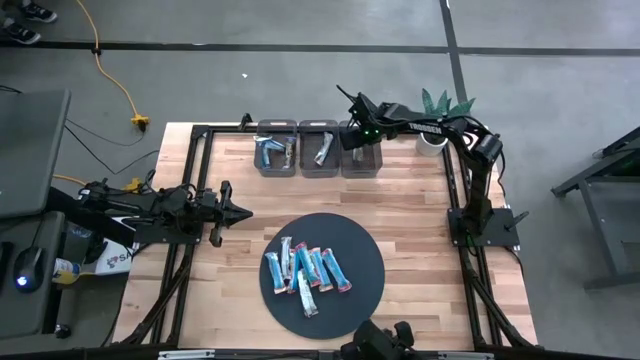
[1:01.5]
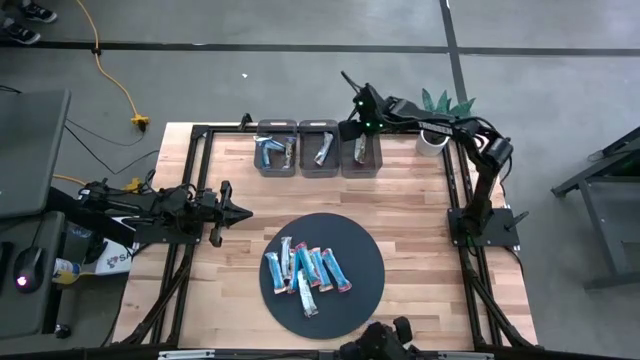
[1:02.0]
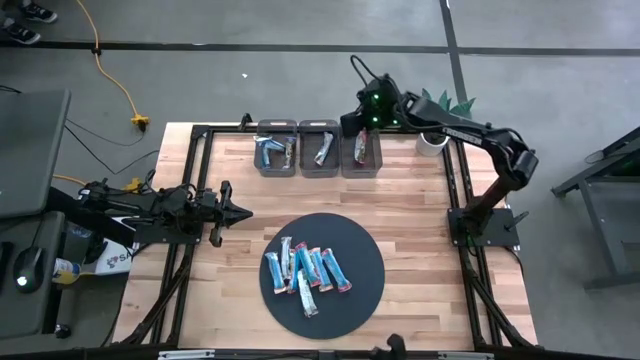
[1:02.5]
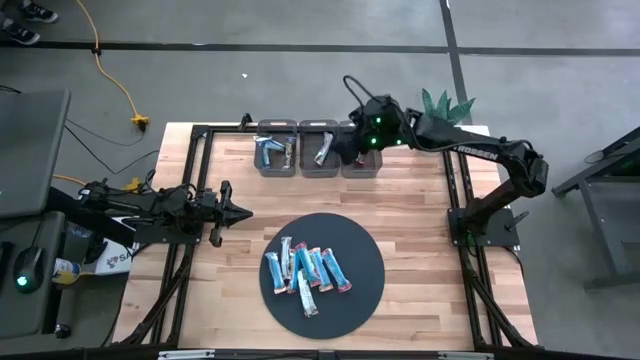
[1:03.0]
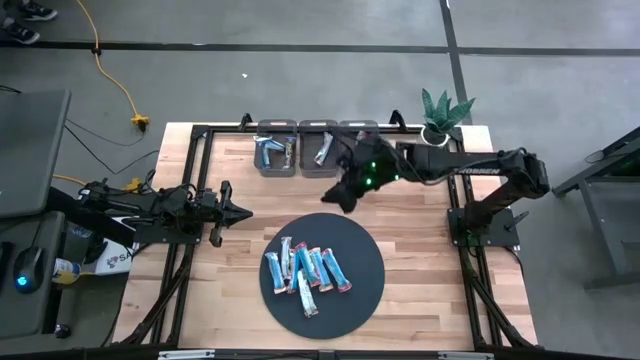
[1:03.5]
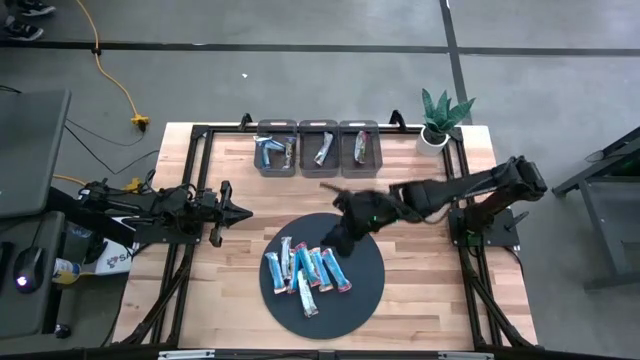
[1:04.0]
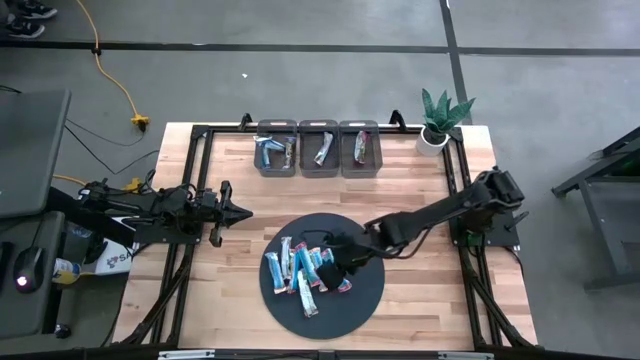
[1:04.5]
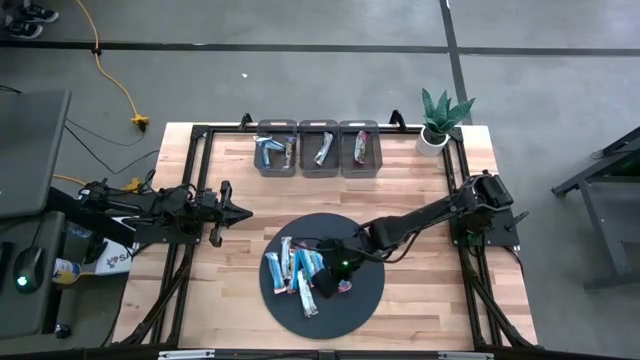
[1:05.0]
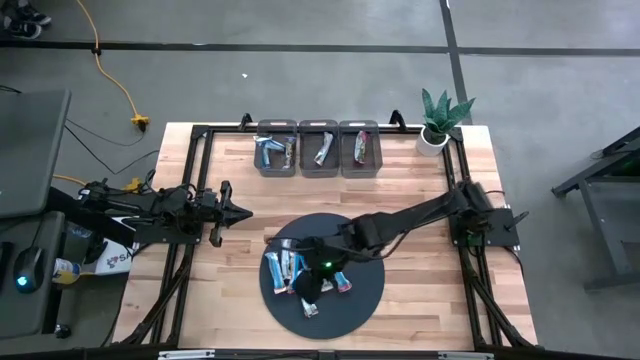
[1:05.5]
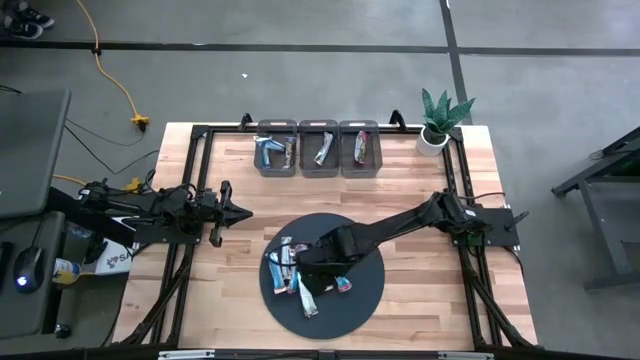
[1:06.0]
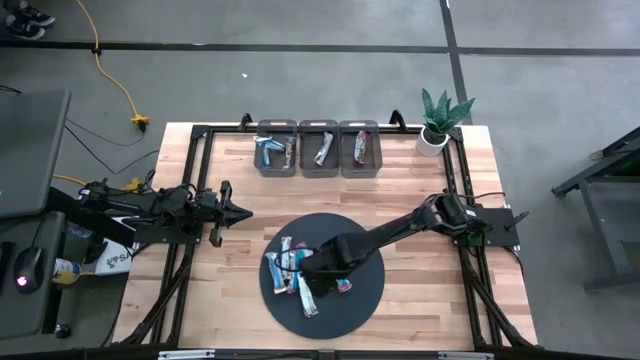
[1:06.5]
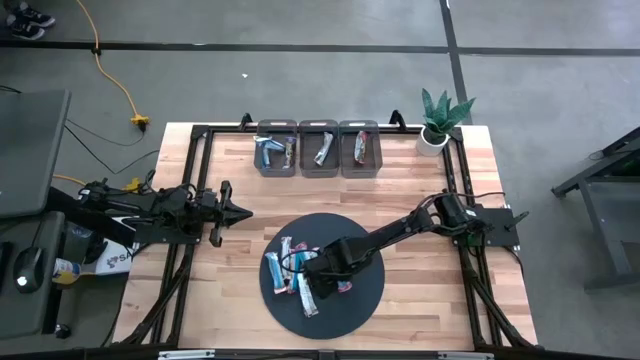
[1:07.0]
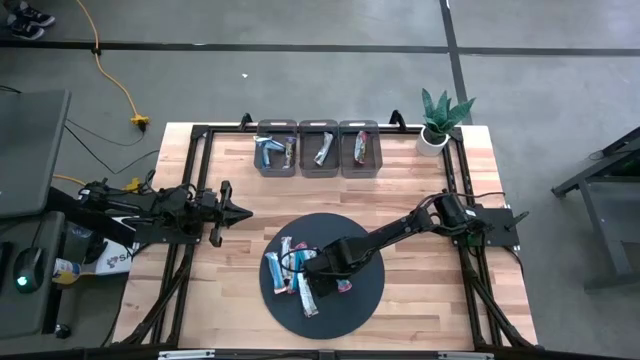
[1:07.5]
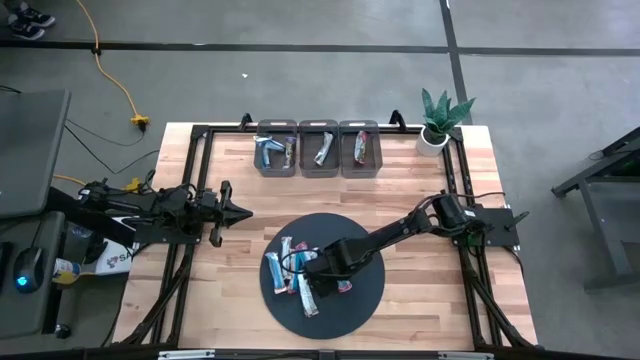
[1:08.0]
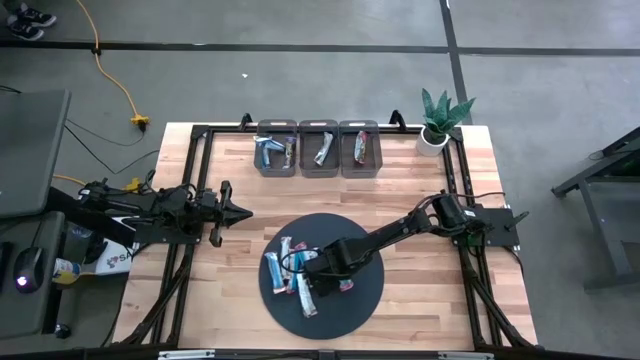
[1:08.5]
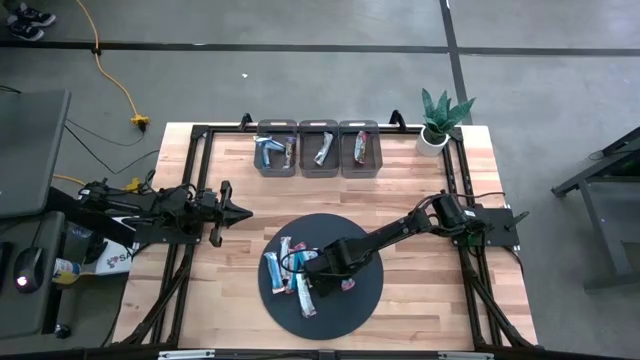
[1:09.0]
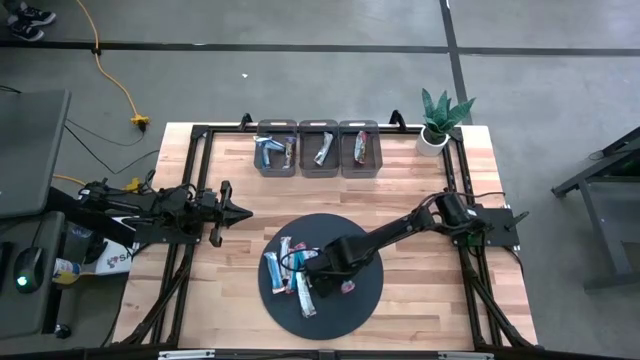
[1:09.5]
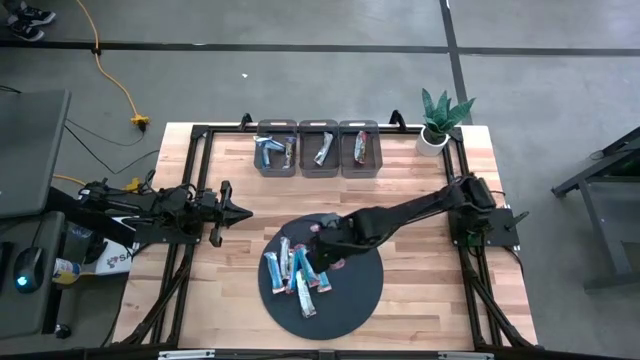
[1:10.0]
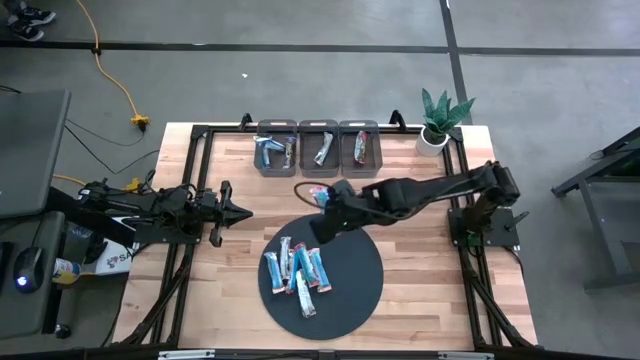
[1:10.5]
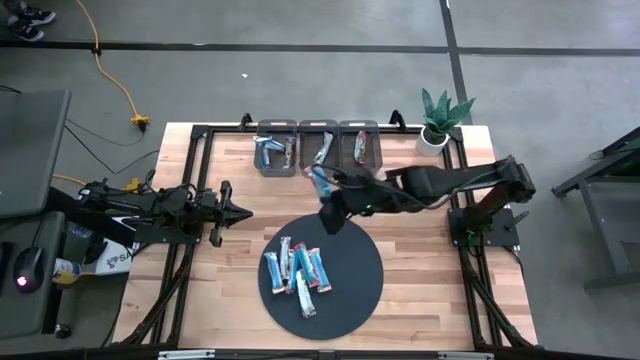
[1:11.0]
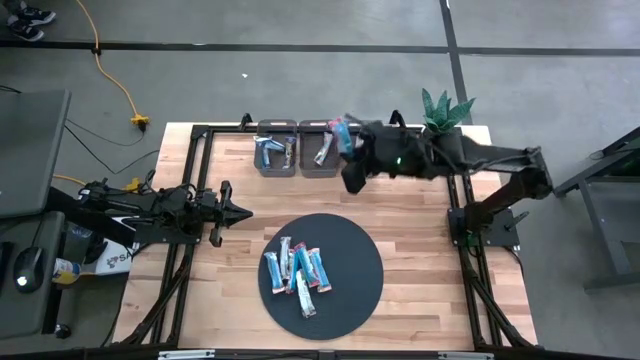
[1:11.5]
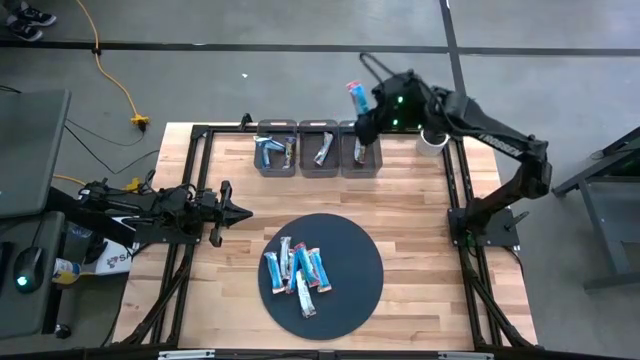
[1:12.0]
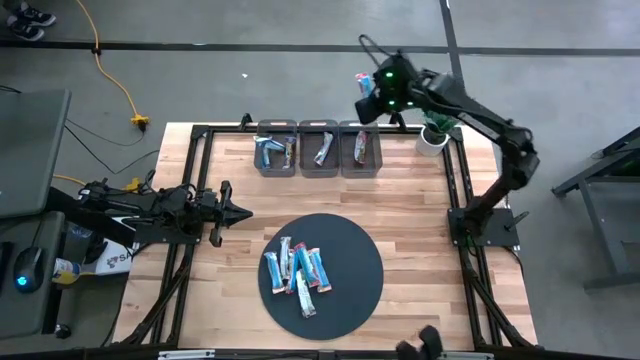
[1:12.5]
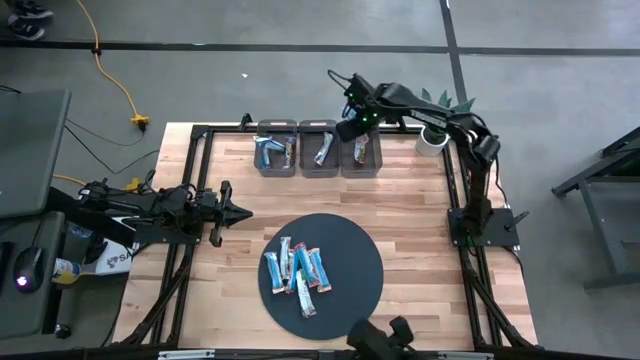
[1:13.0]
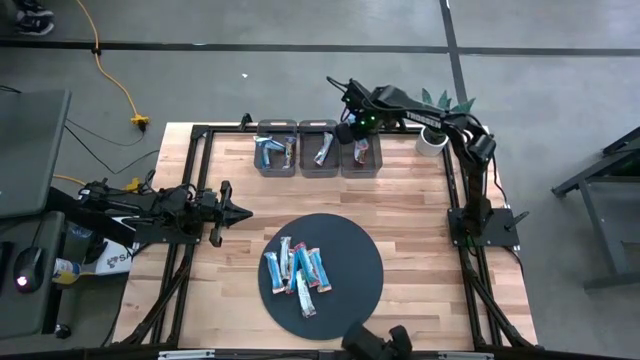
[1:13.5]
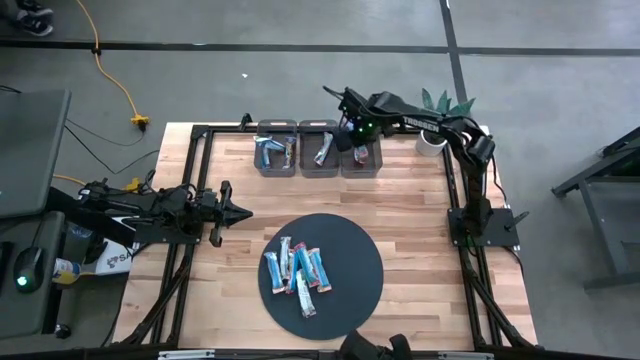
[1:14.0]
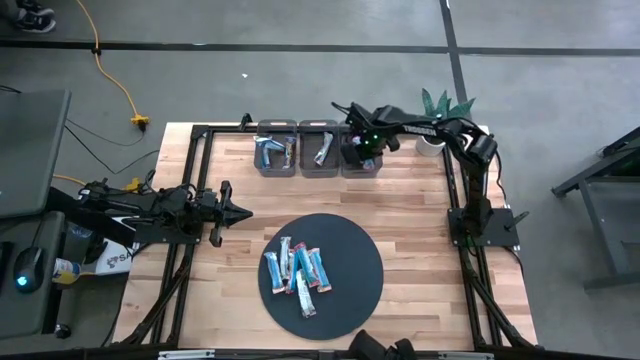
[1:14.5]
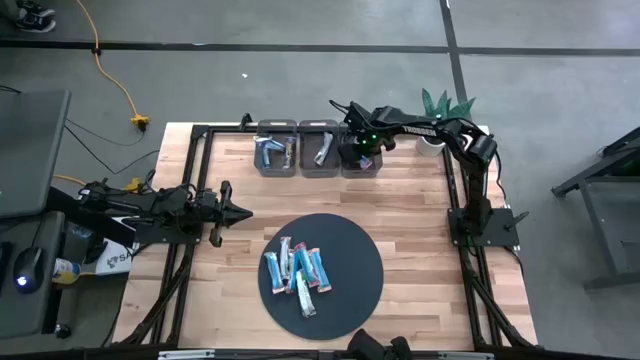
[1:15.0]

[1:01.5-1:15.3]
Task: Pick and place Granola Bars by type
Put the red granola bar into the right black bin

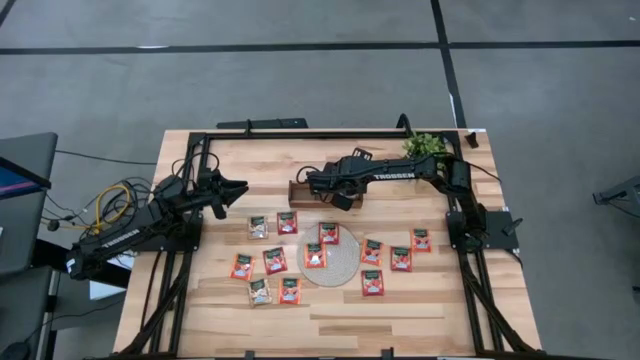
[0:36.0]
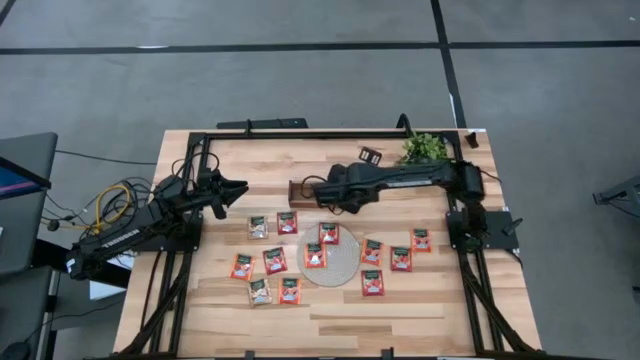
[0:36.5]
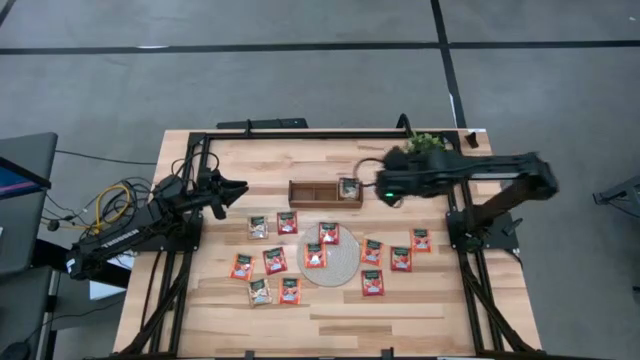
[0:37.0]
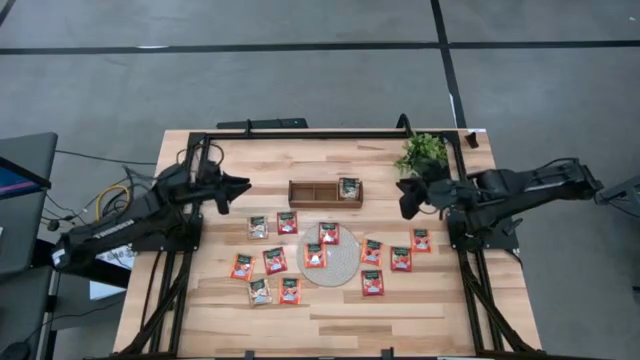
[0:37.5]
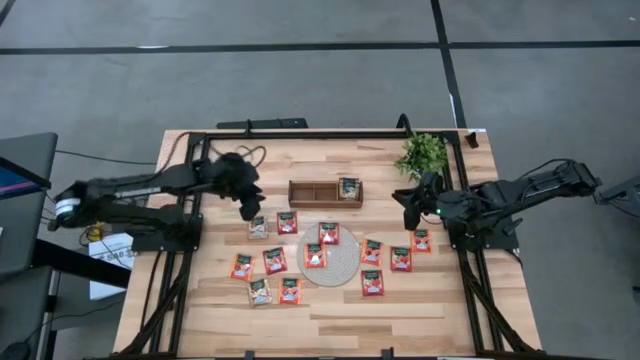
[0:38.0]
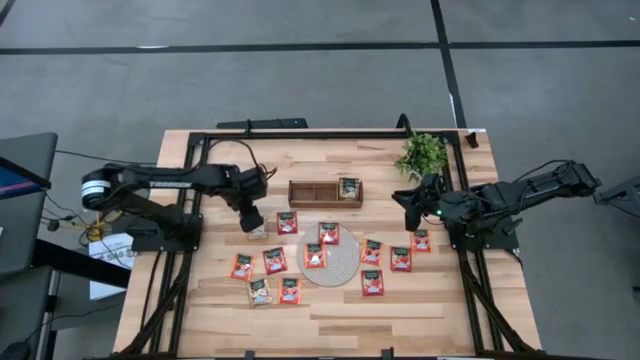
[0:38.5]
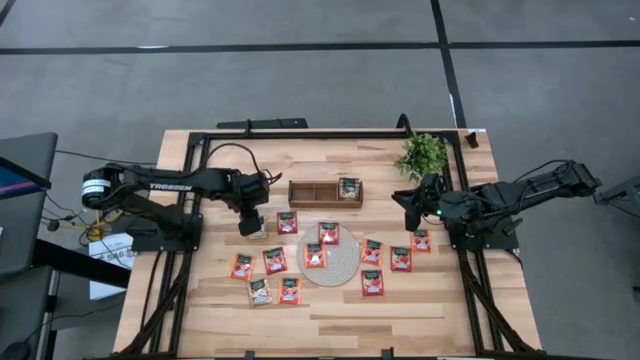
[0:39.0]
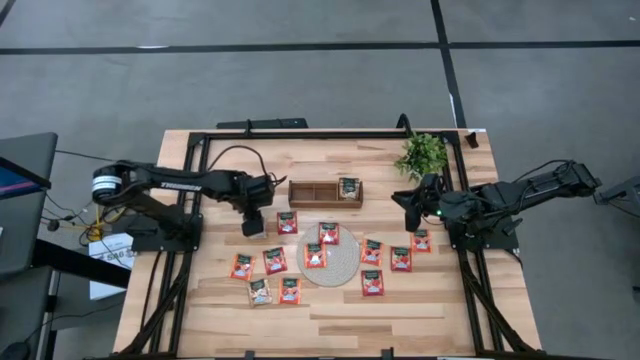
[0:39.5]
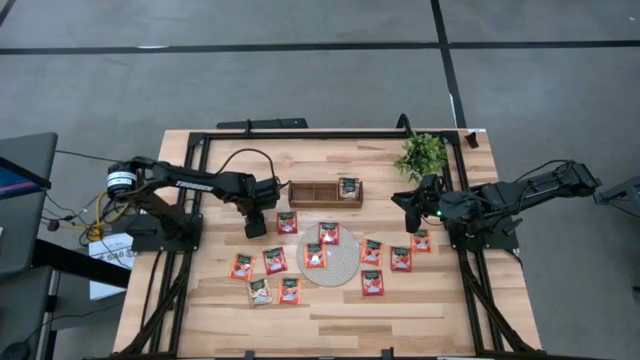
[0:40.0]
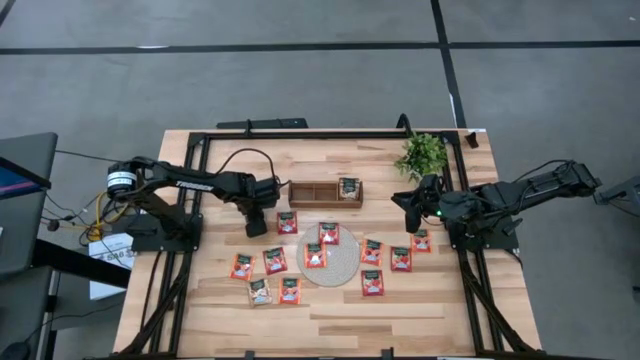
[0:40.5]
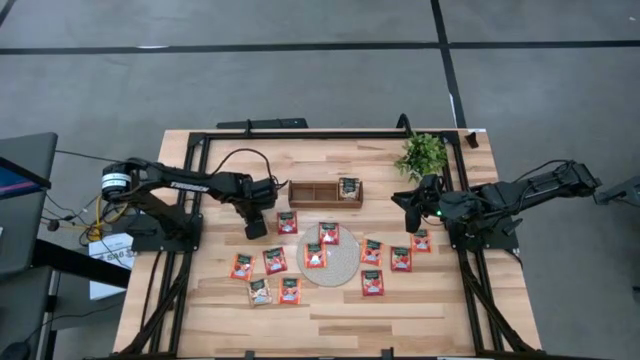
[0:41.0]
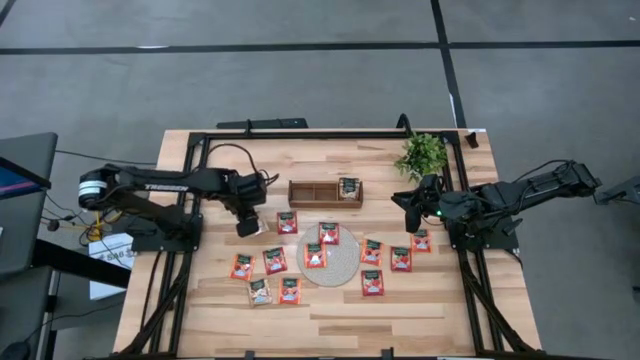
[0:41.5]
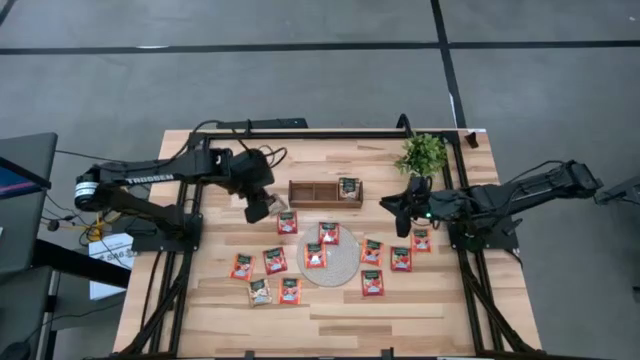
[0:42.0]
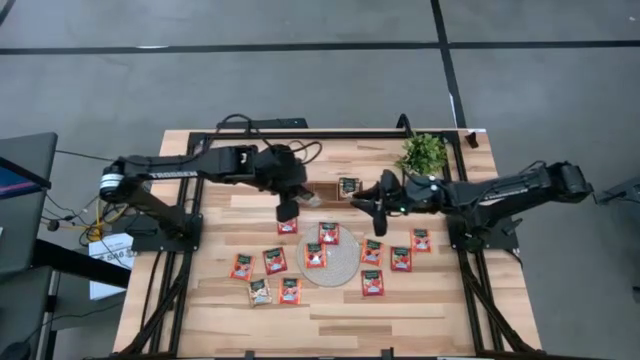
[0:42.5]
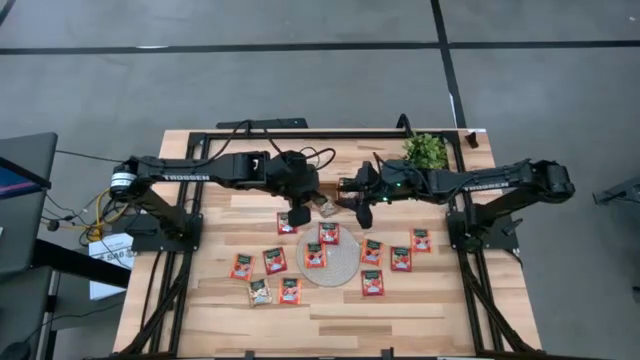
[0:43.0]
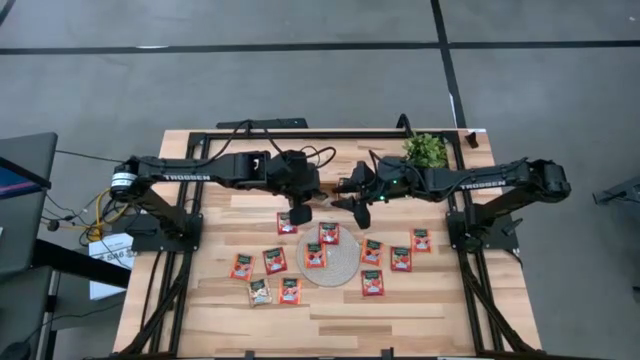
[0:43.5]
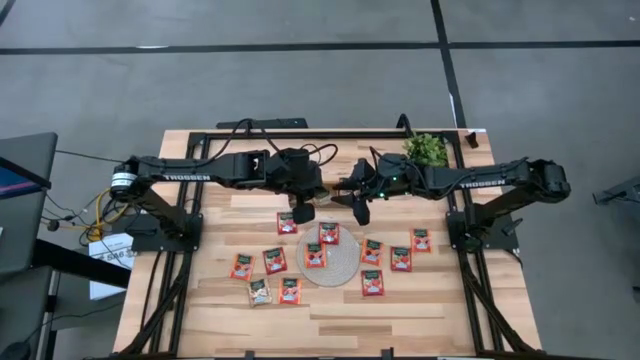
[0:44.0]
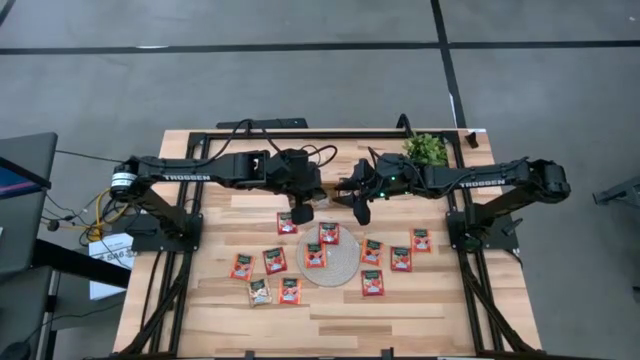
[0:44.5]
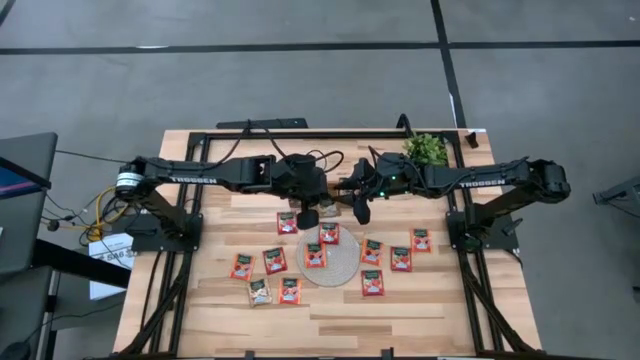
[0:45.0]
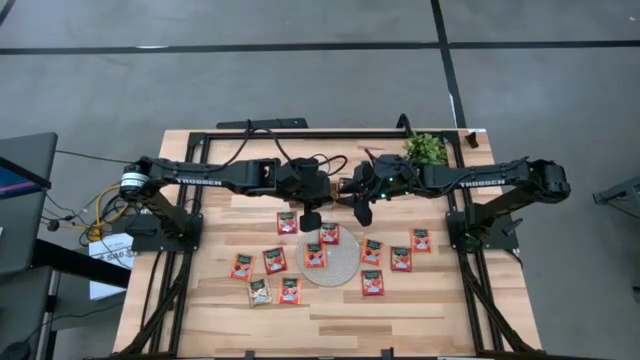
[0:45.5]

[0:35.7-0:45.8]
Task: Pick & Place Tea
Put the brown tea bag into the right section of the wooden organizer
